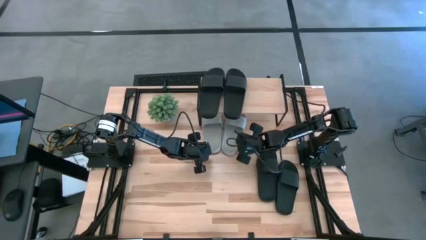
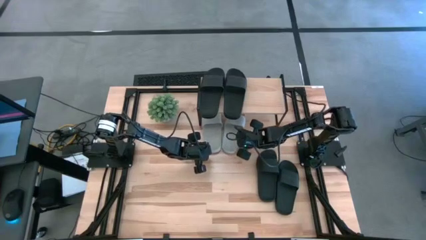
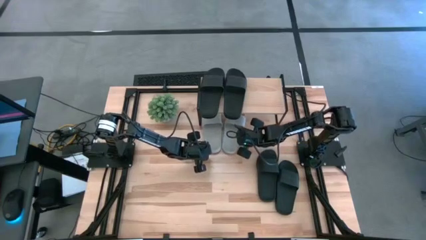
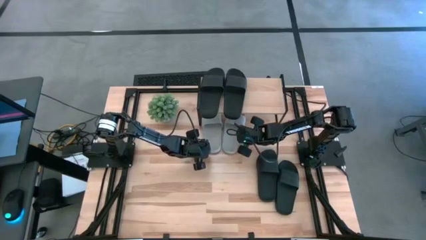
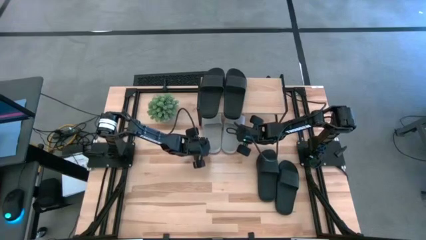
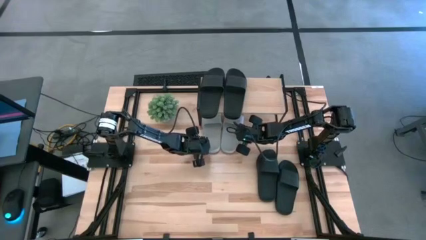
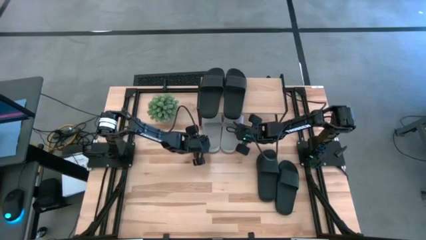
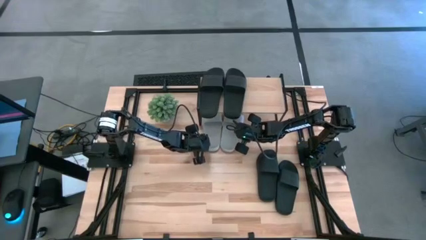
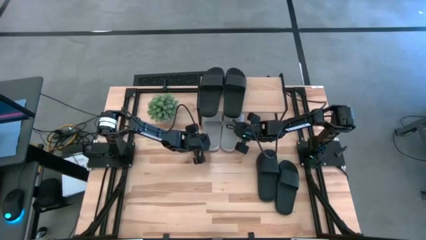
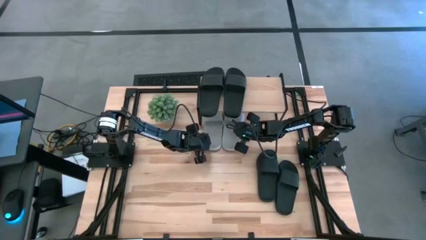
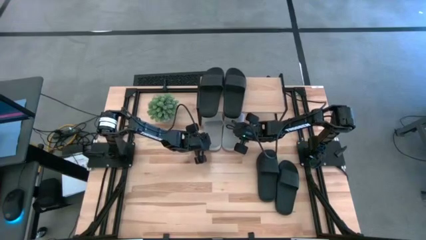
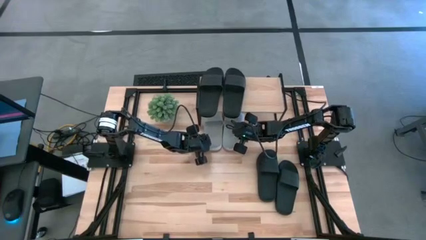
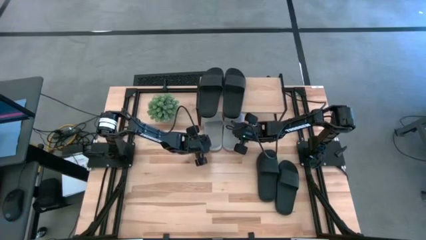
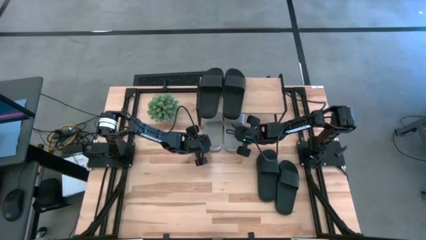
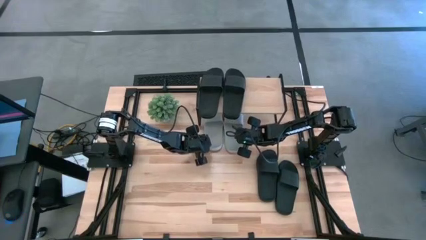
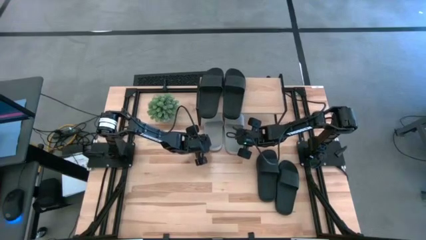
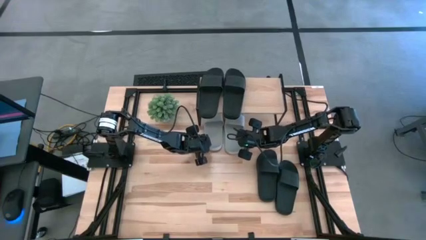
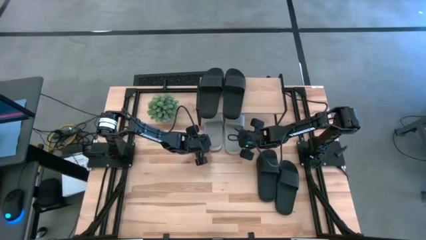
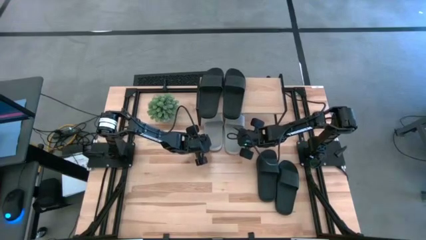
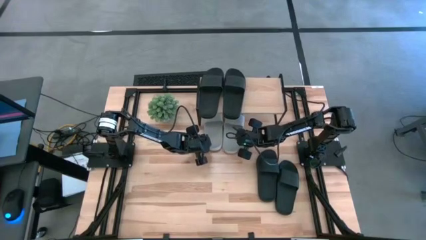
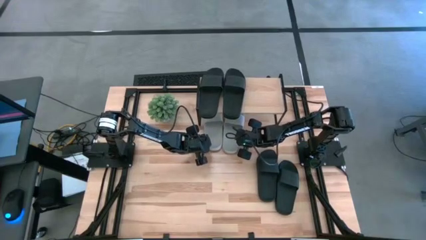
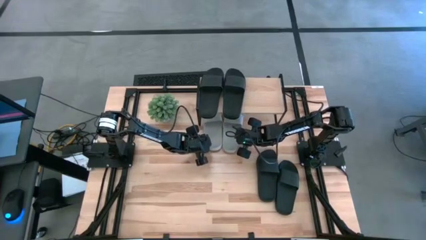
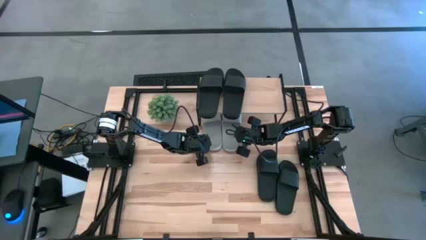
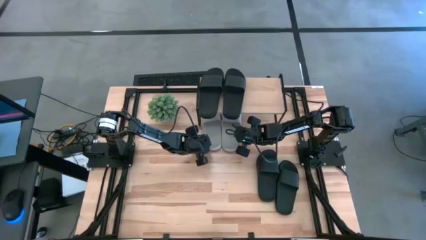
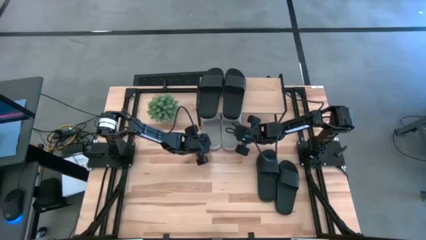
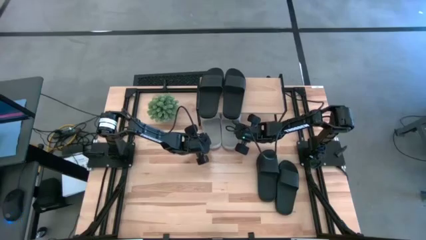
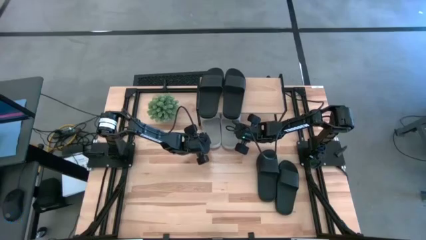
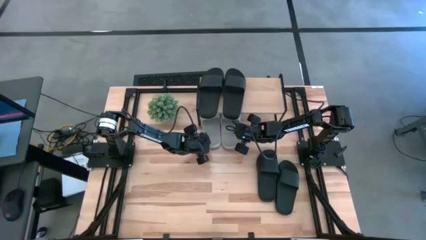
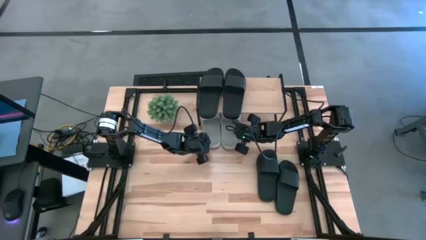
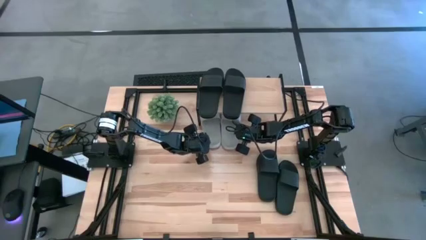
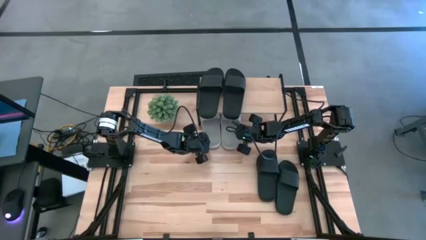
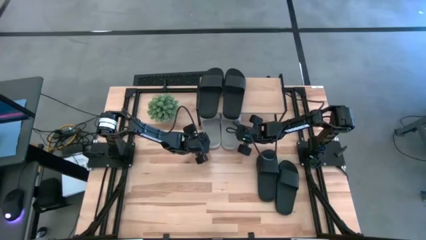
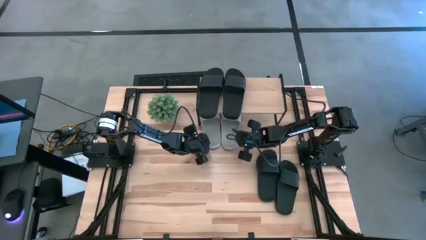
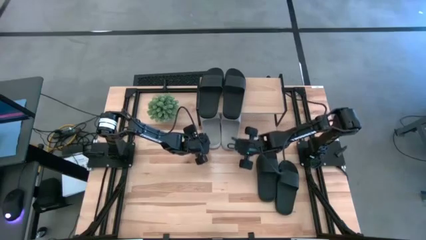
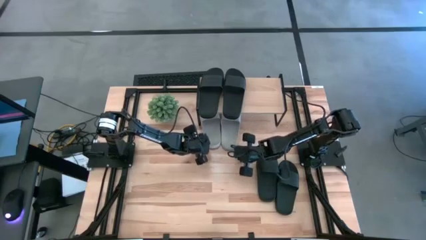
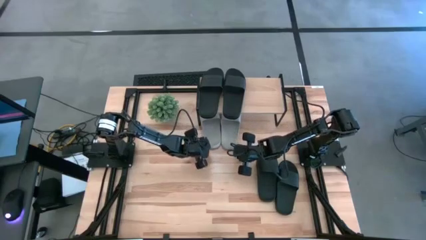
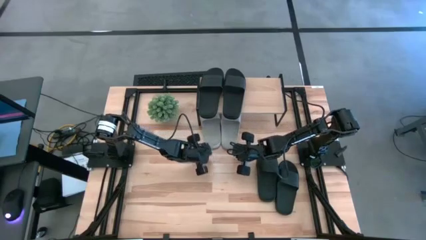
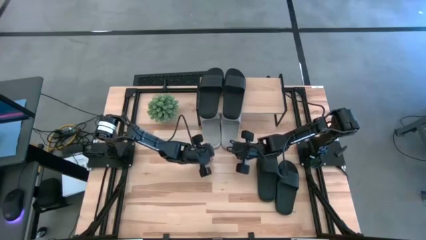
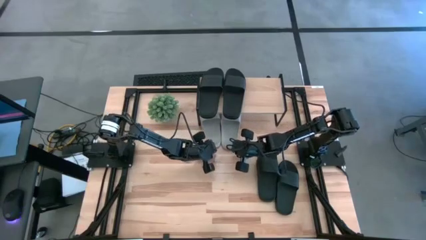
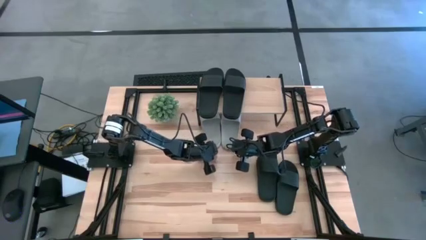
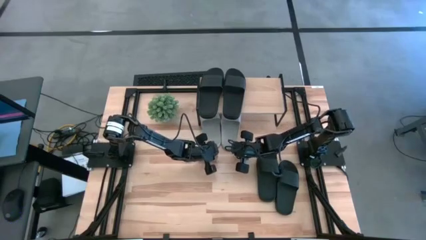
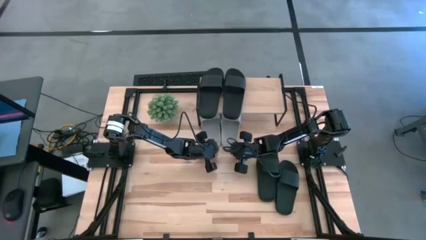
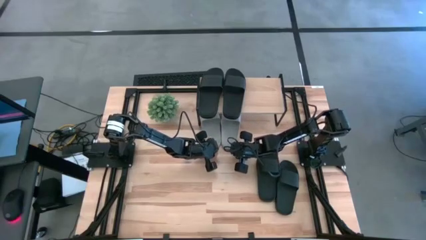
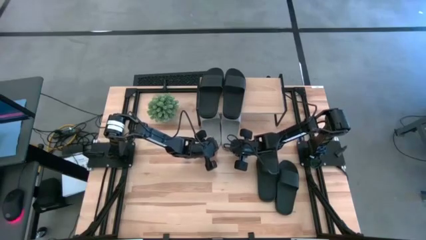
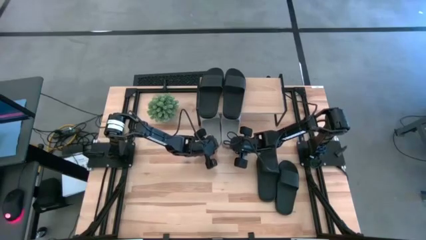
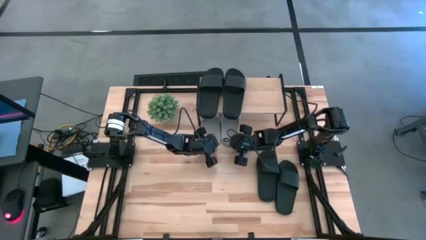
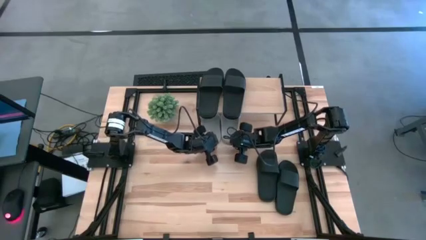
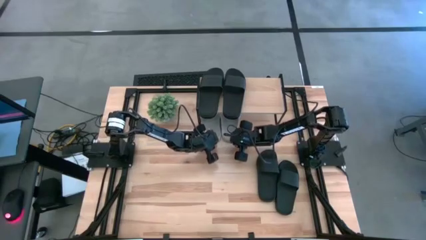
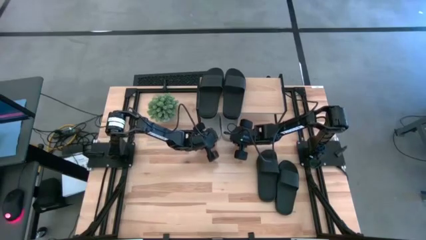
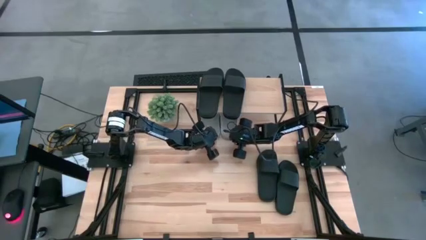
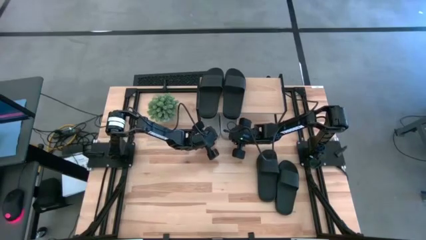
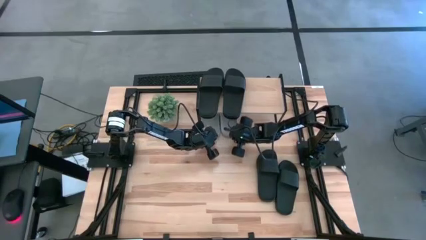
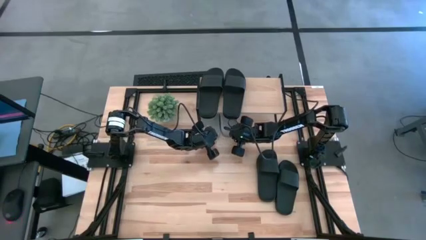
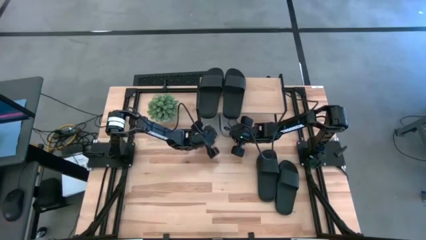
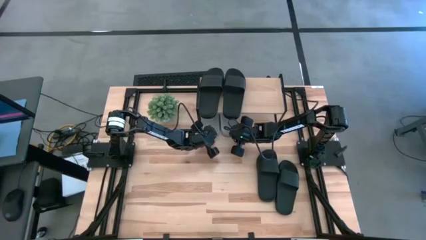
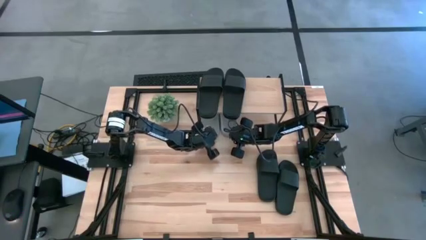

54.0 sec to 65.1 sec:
Task: Pick and place slides into the shelf
Adjust the gray slides under the shelf to align the position

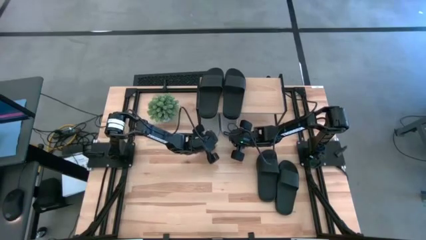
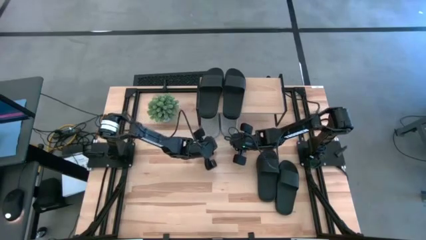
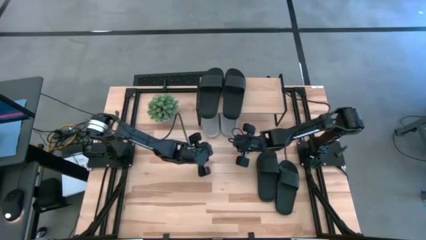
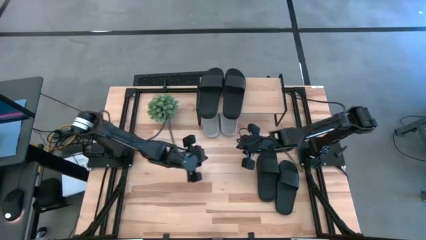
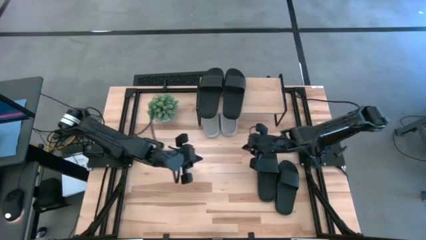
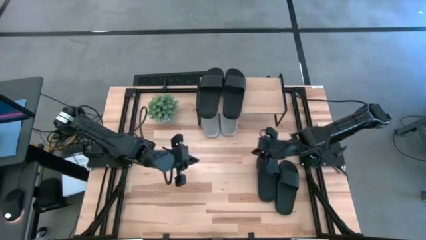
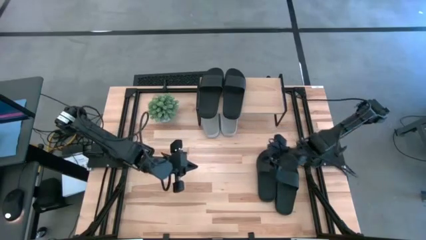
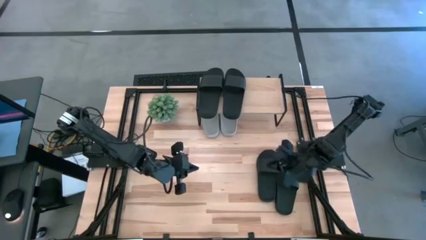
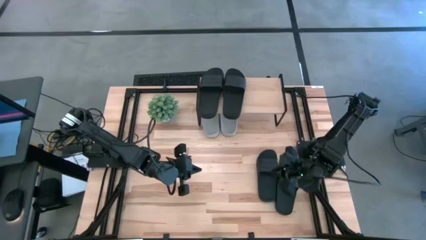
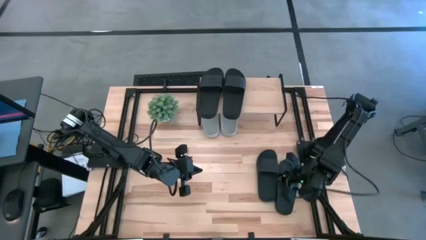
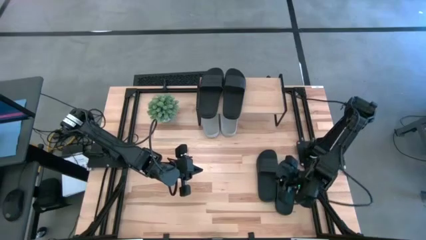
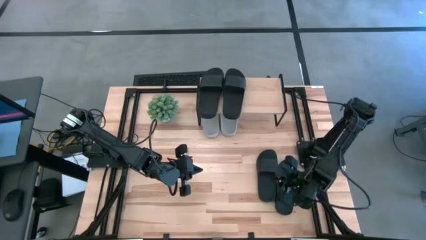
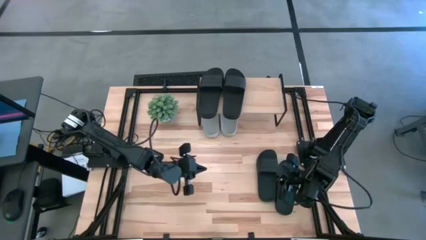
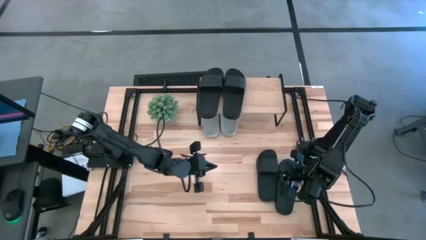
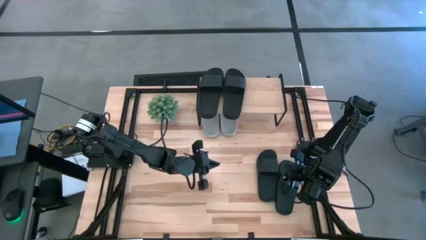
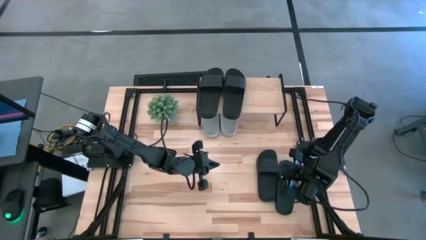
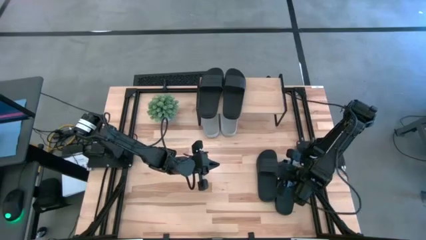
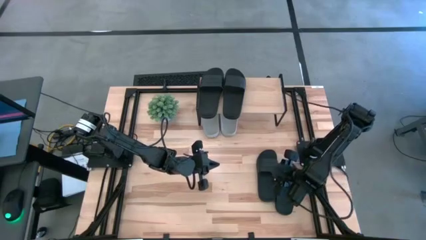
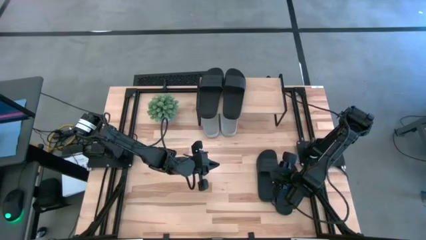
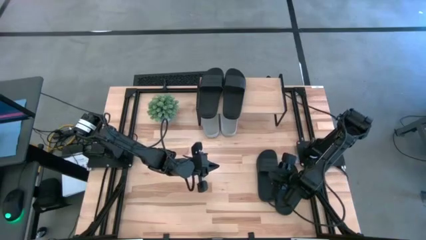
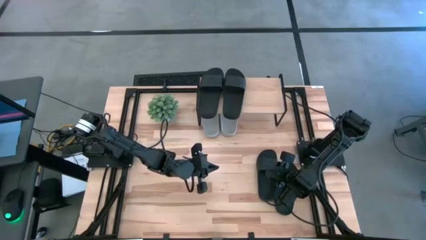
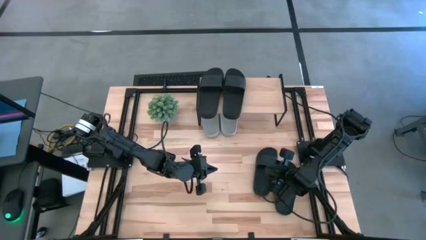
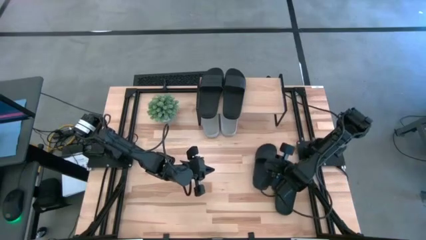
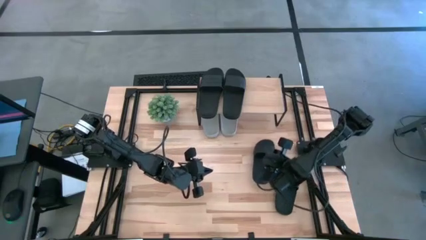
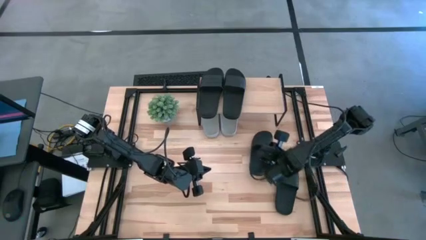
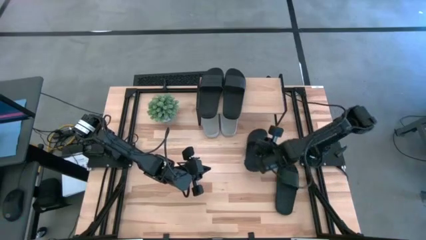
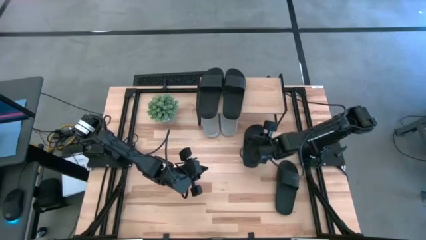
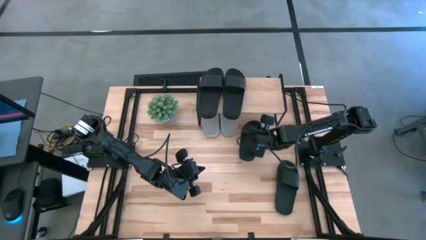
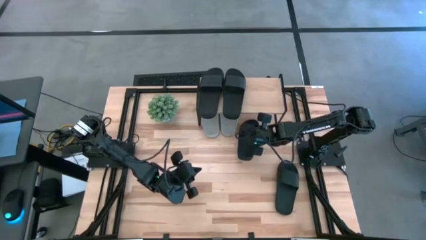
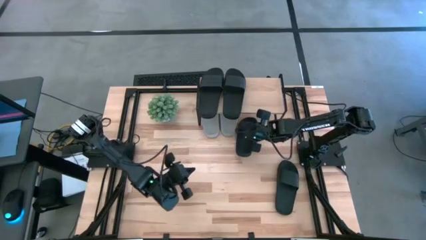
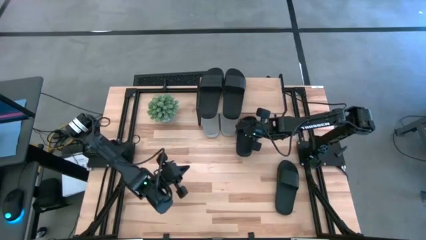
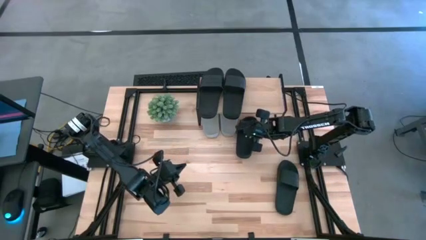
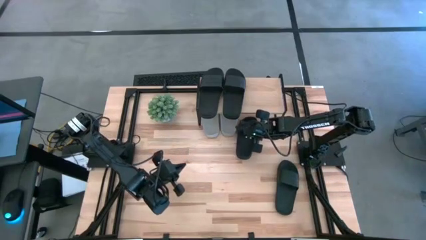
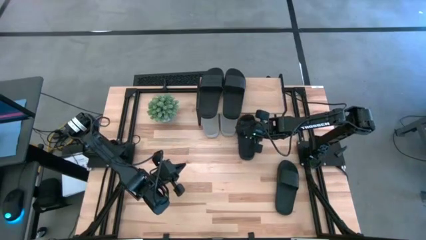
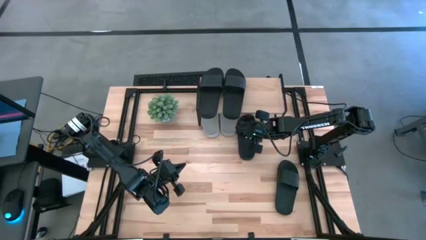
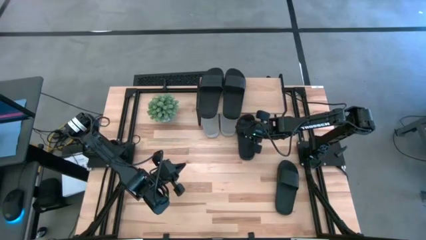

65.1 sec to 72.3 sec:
Put the left black slide under the shelf
